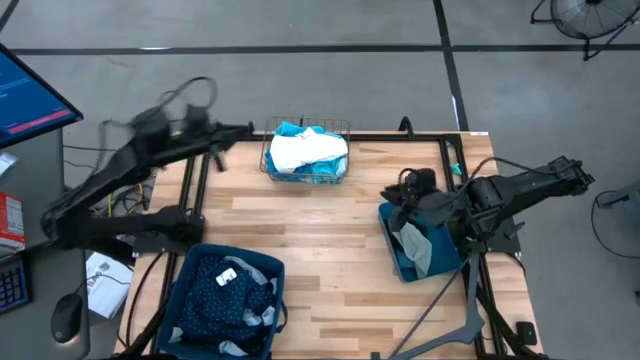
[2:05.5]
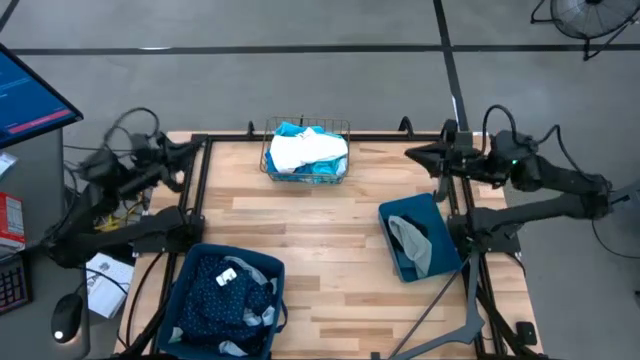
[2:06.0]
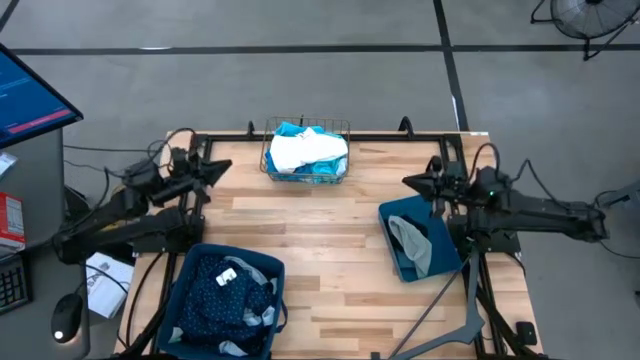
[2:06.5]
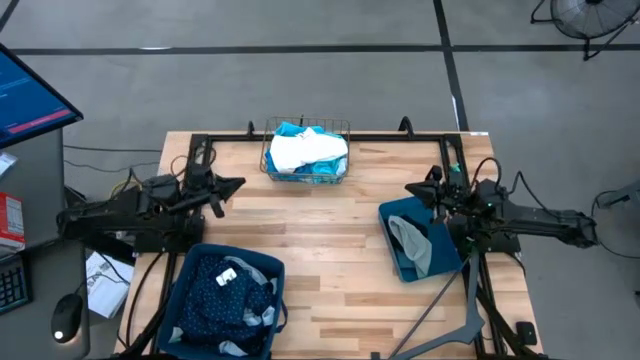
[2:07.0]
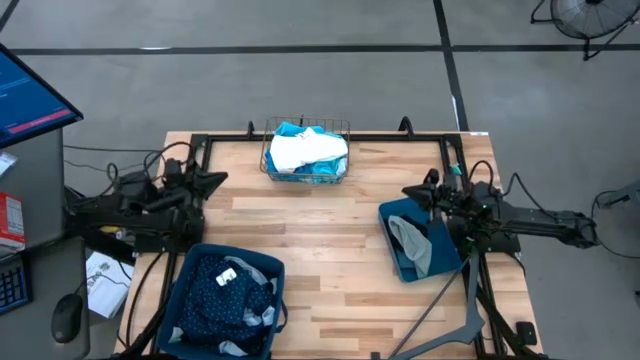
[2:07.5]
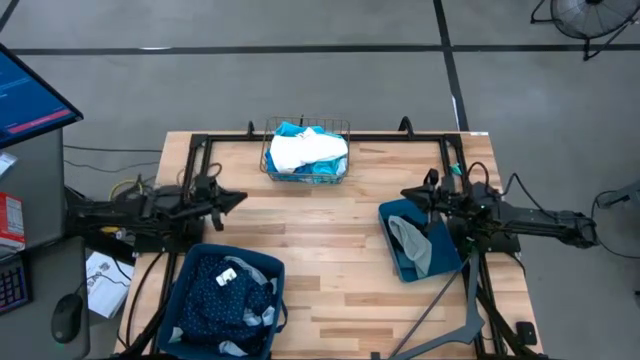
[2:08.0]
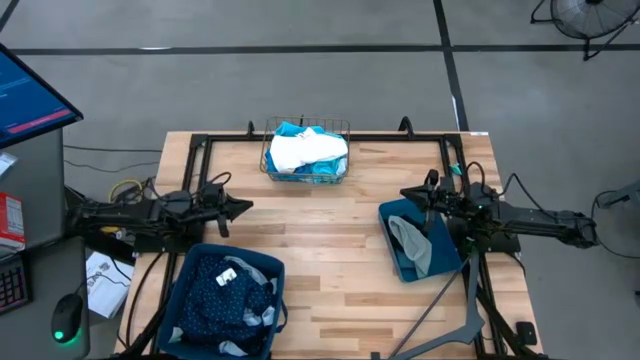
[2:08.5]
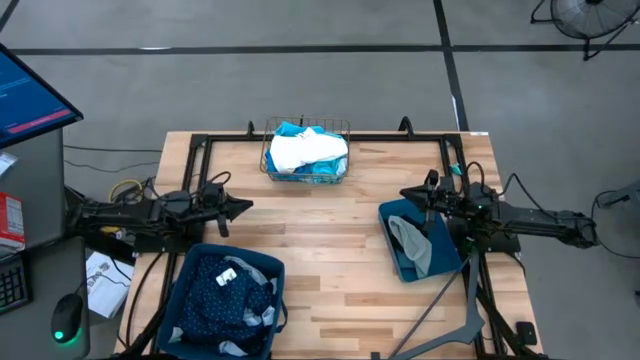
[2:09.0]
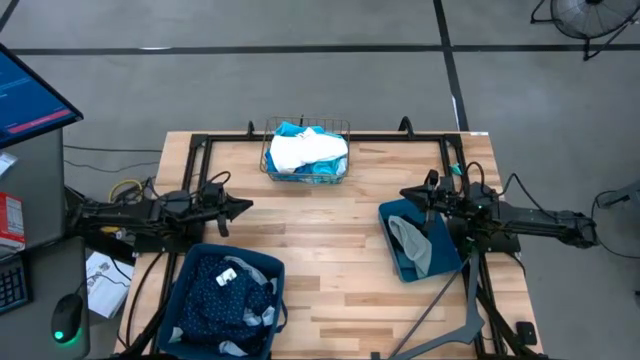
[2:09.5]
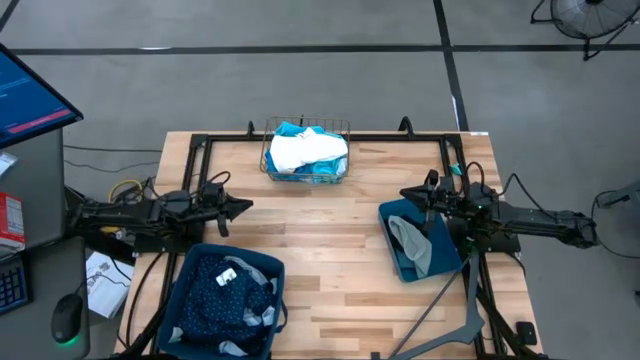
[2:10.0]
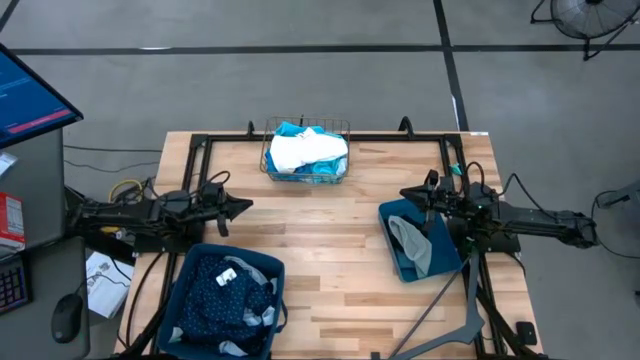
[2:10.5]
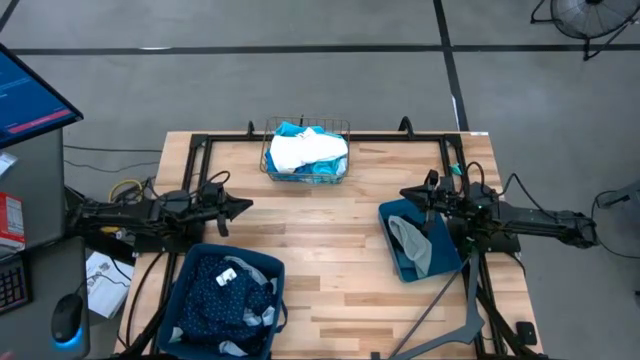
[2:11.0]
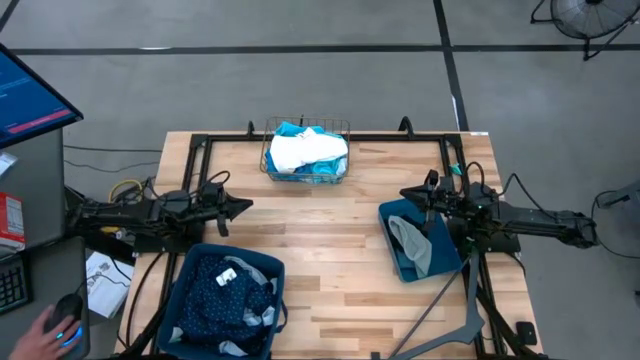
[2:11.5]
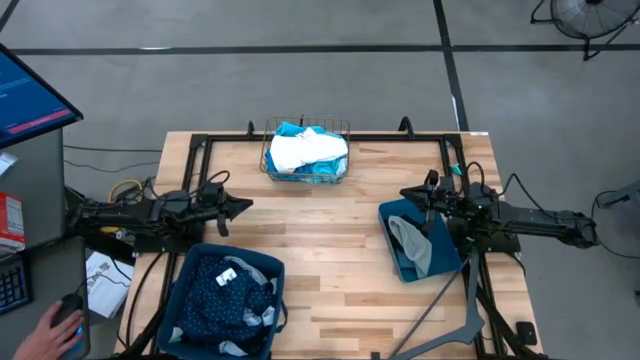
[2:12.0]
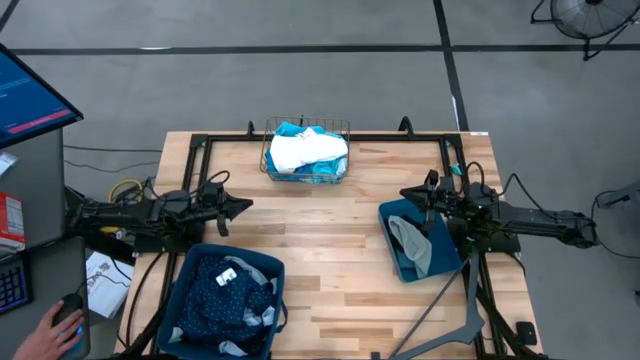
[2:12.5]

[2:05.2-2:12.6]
Task: Pick & Place Cloths
Return to Home Position

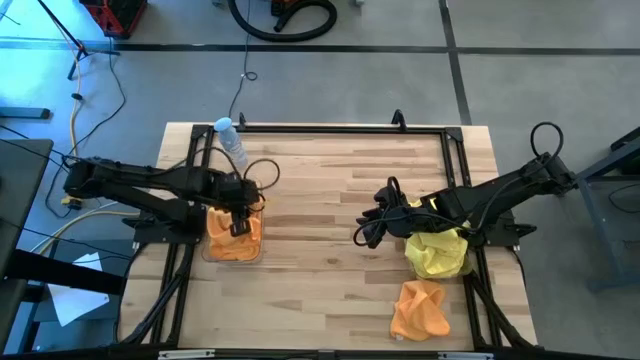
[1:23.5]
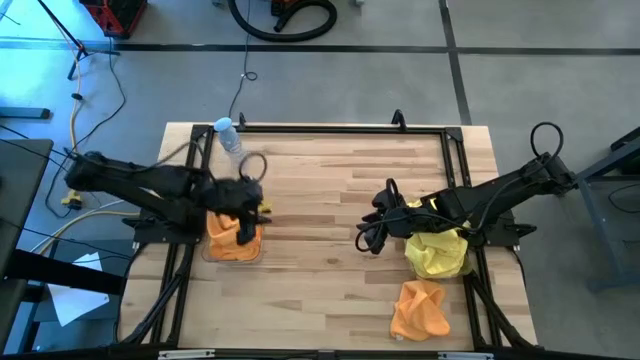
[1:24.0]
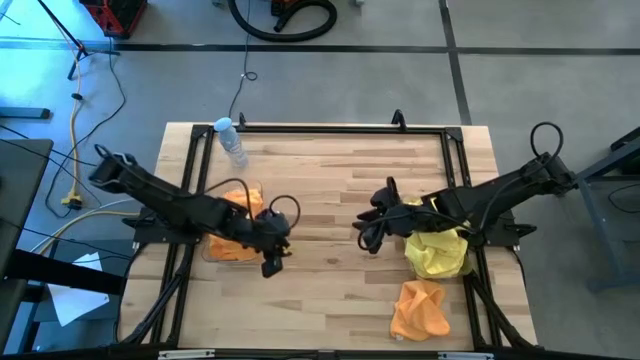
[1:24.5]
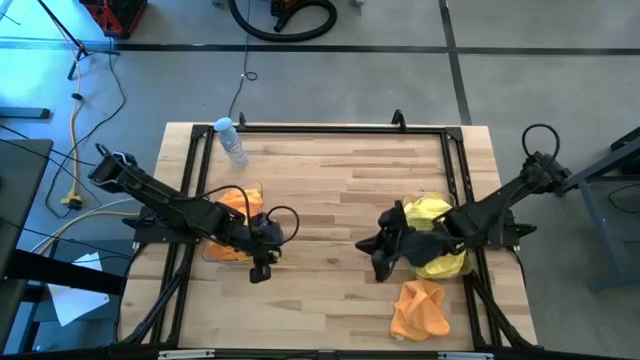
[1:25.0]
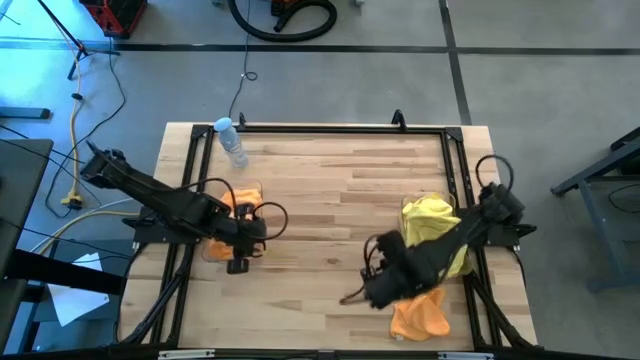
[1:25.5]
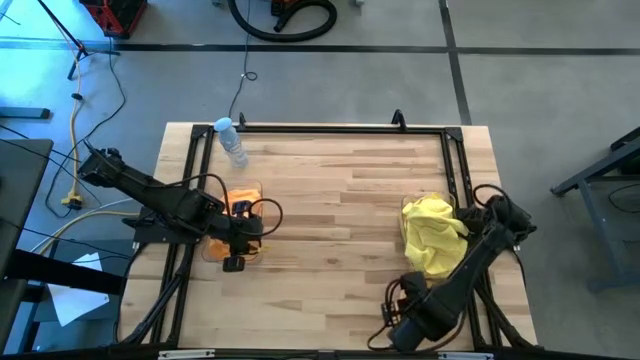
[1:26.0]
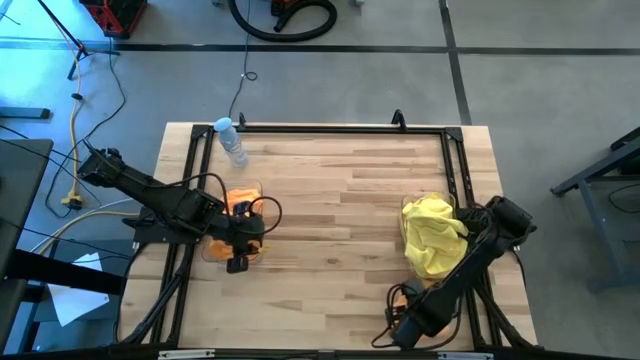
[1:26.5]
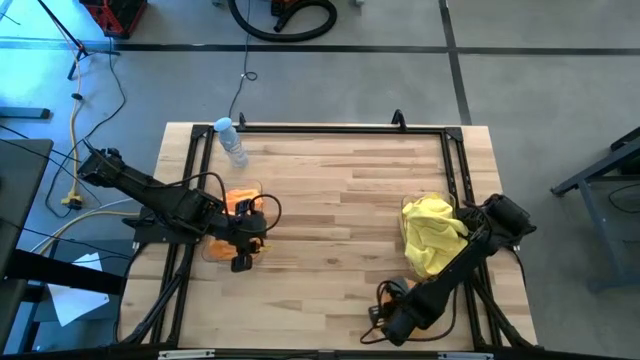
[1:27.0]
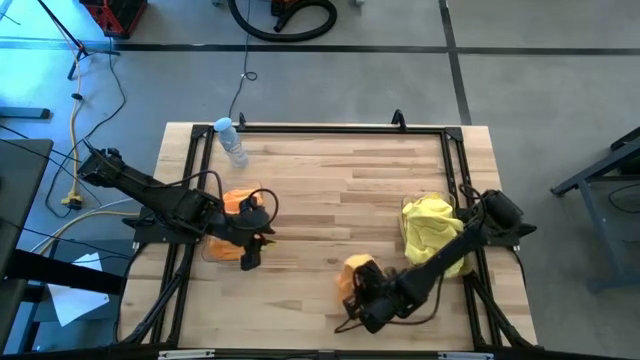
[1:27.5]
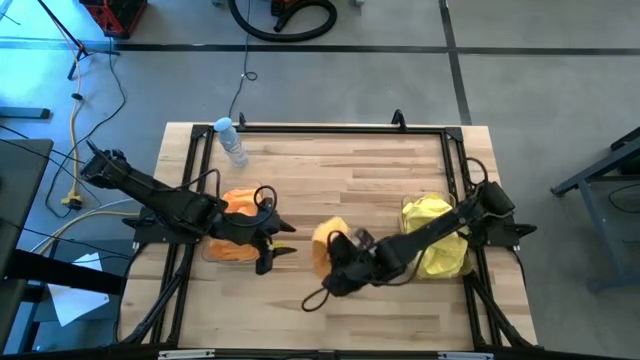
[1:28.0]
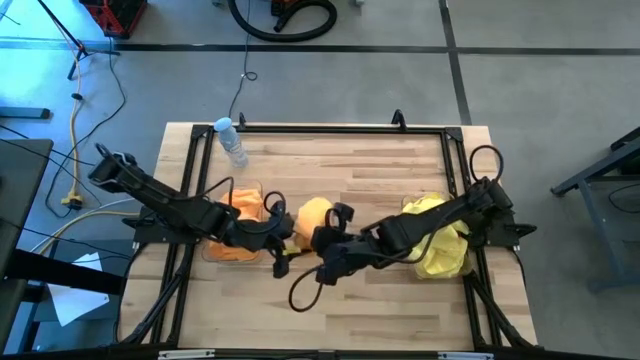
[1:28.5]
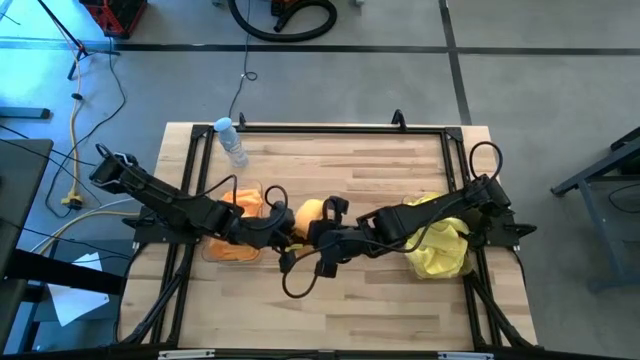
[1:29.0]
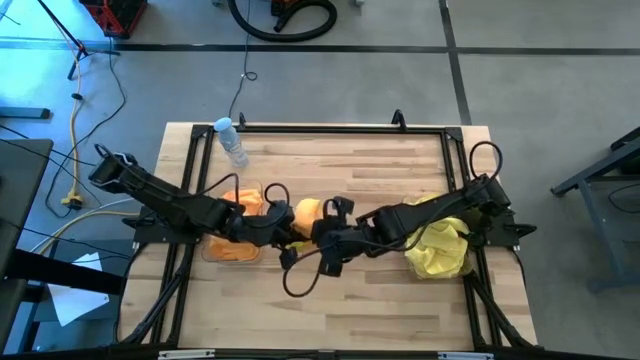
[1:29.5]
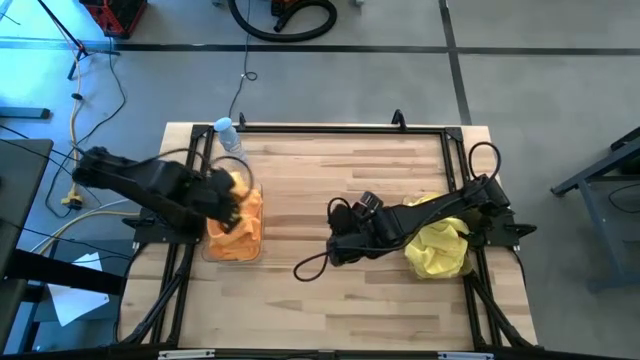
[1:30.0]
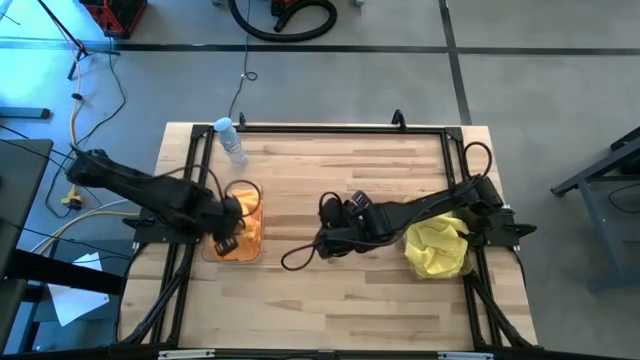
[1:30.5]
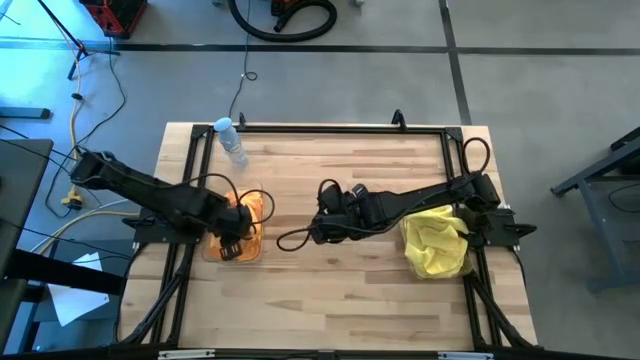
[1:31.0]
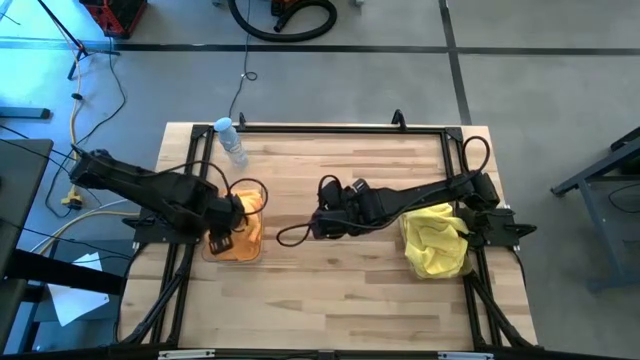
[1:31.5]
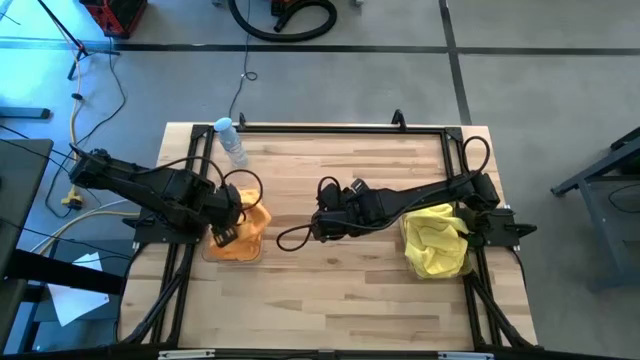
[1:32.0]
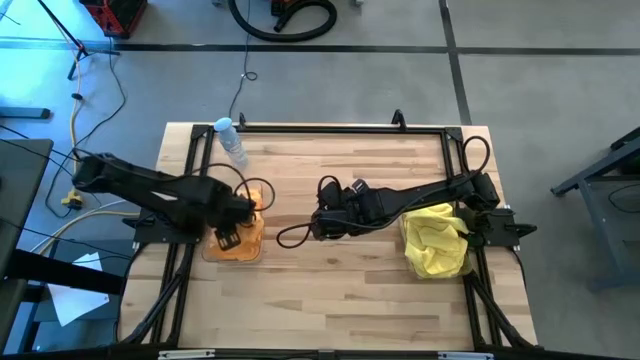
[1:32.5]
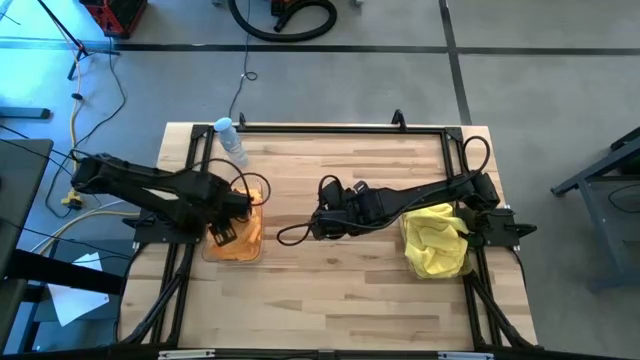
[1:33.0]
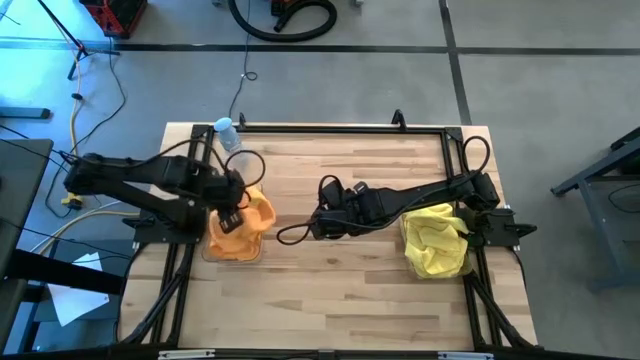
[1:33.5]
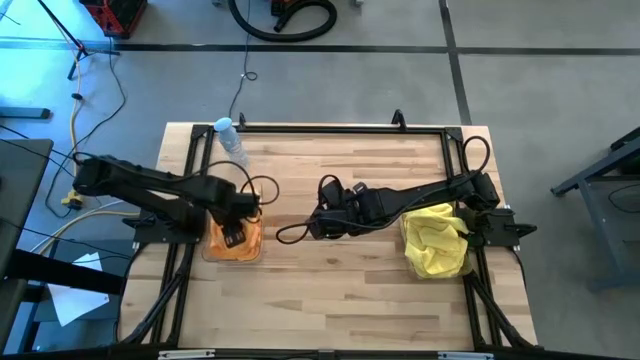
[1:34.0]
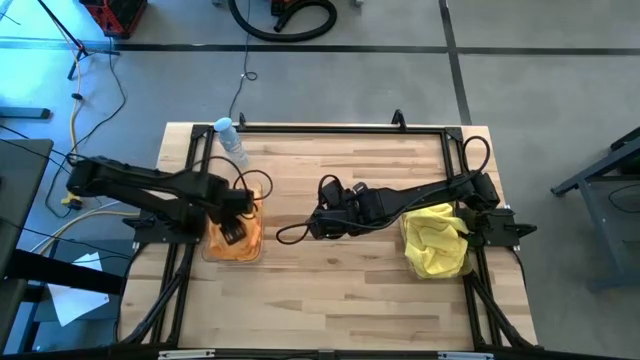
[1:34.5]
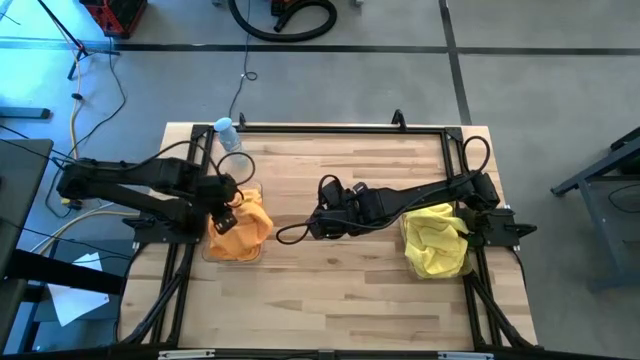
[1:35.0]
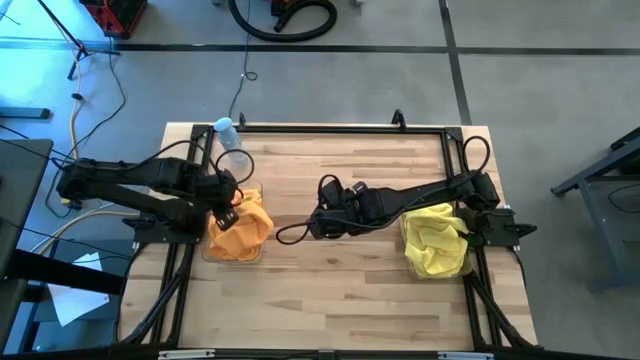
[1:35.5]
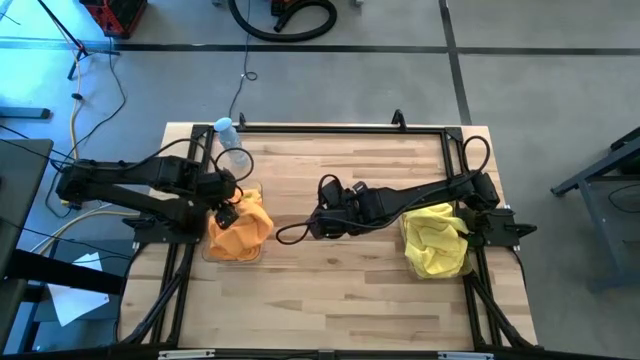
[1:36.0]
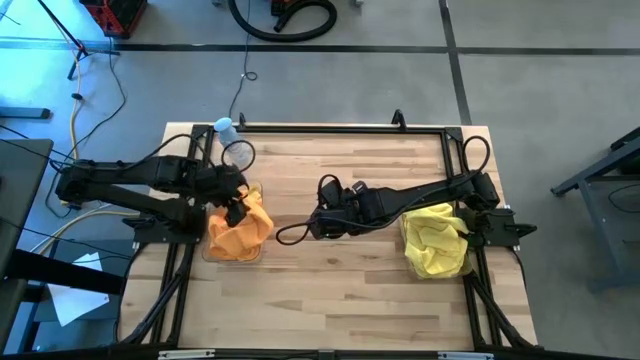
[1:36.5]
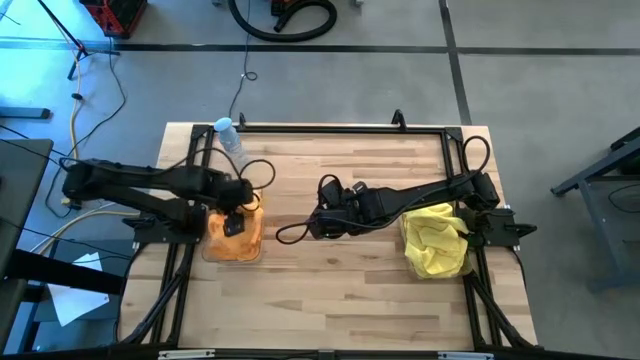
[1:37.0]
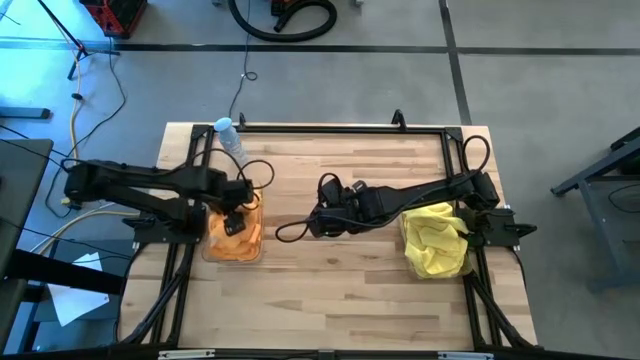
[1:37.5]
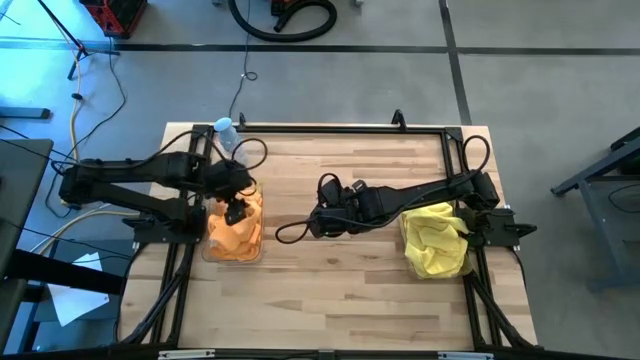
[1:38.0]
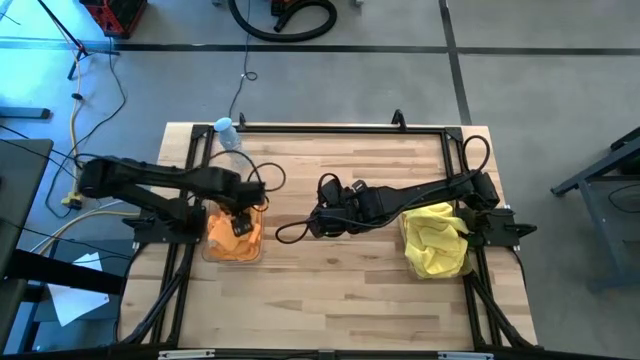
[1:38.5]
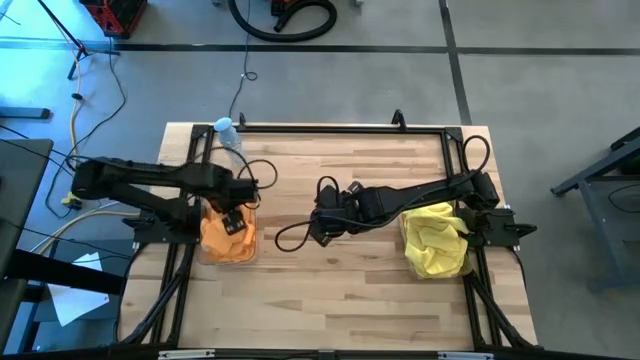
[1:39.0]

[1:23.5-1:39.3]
Task: Sort microfiber towel by color & place in baskets
Put the orange towel into the left transparent bin
